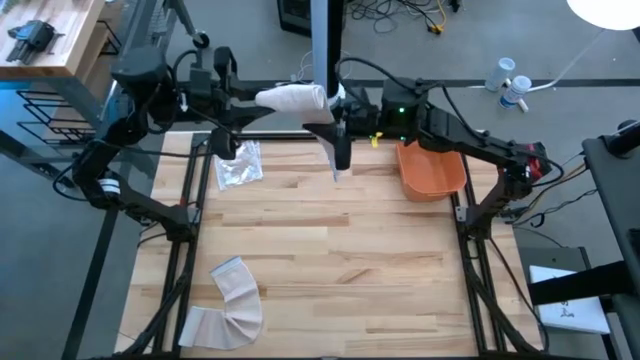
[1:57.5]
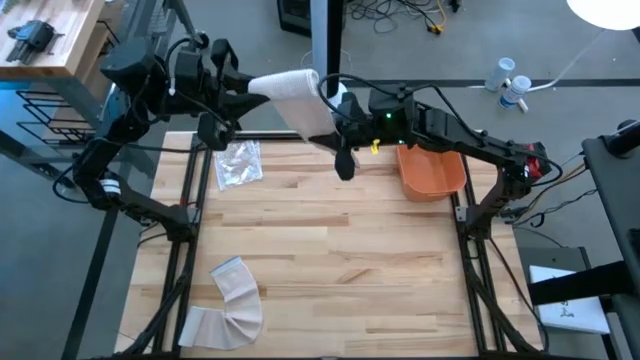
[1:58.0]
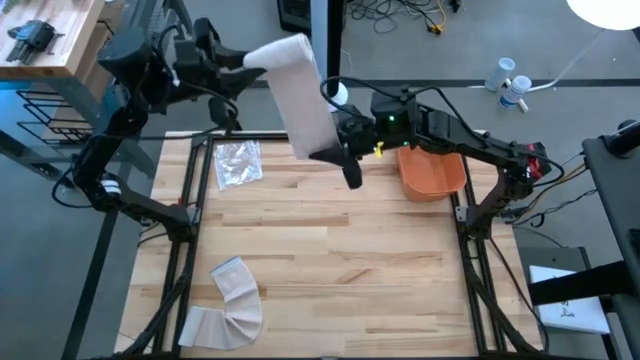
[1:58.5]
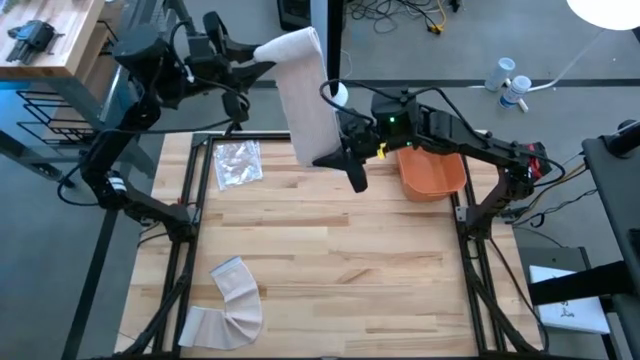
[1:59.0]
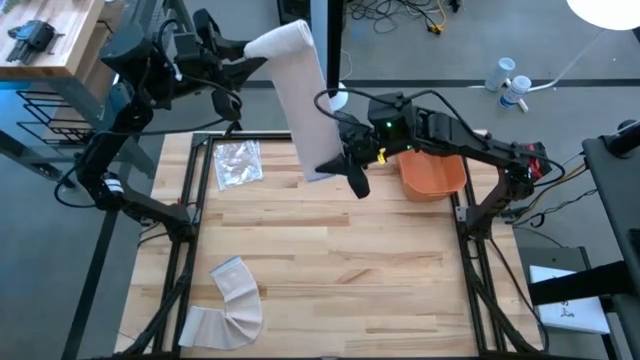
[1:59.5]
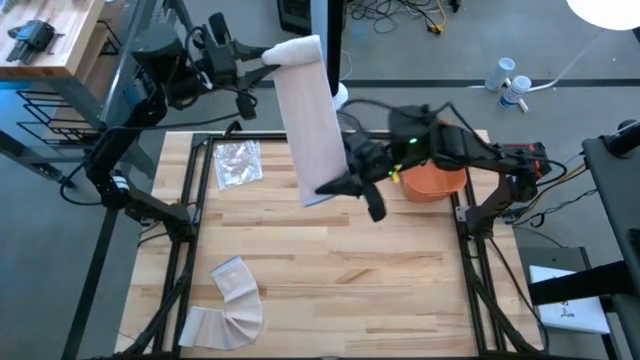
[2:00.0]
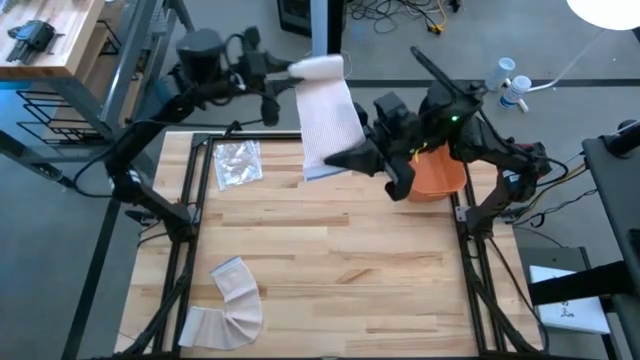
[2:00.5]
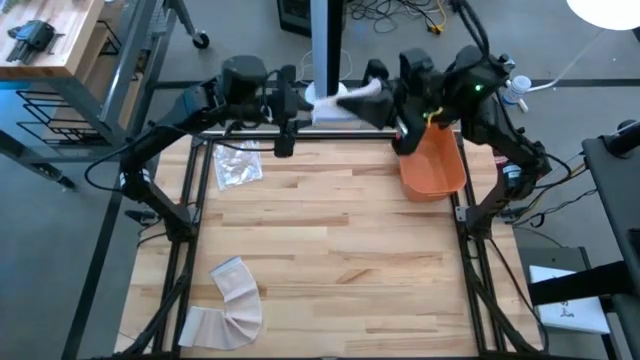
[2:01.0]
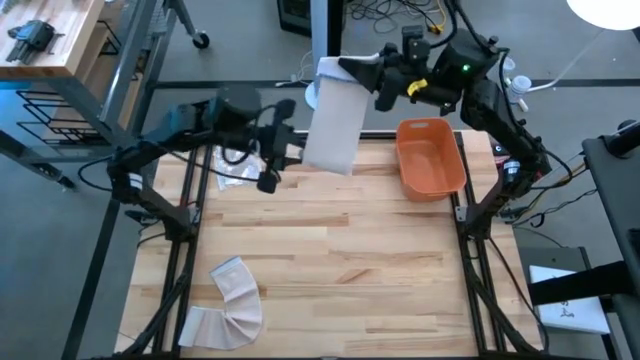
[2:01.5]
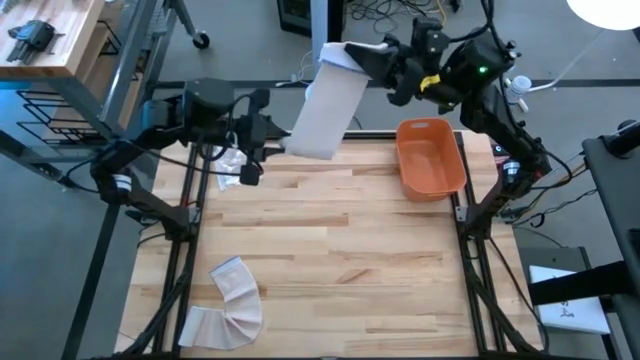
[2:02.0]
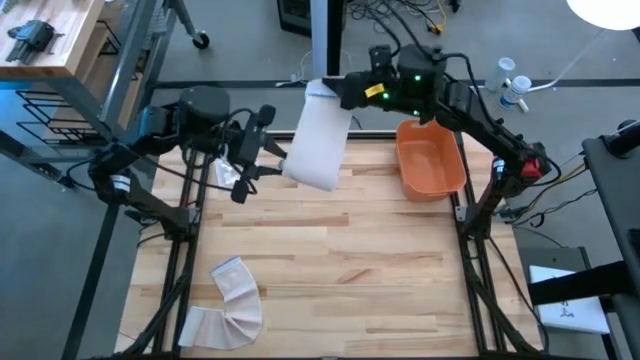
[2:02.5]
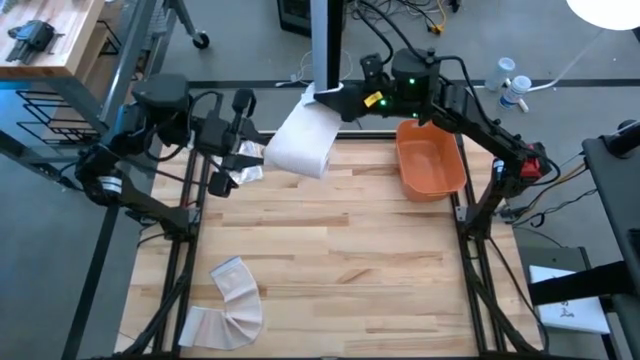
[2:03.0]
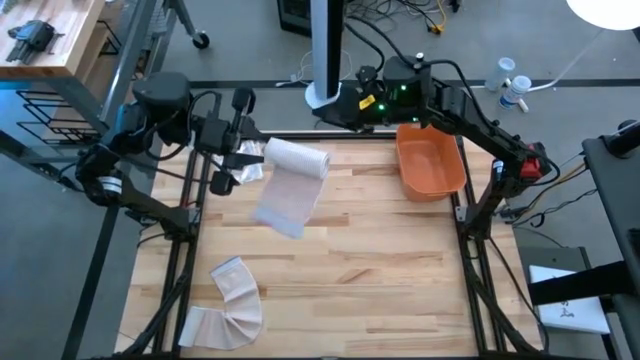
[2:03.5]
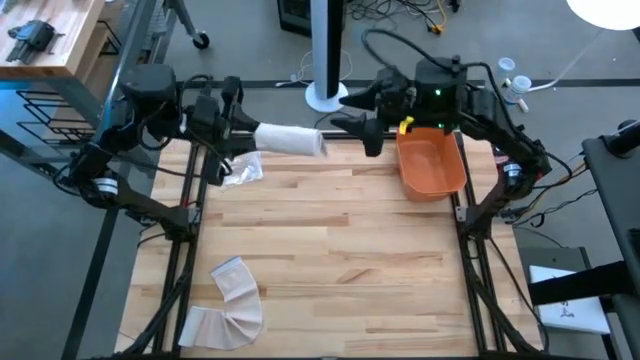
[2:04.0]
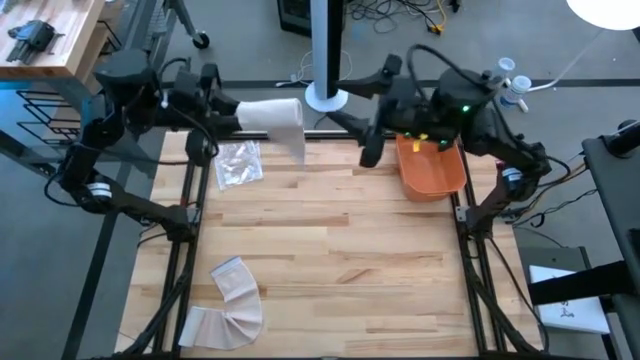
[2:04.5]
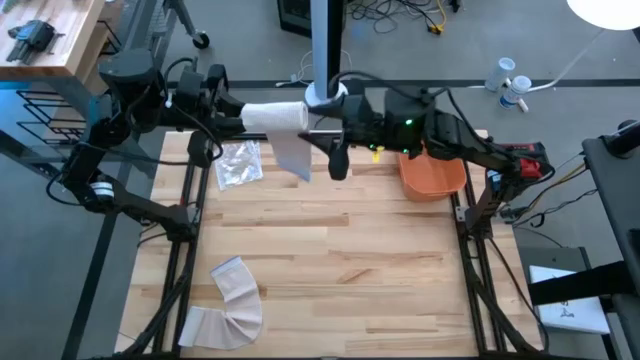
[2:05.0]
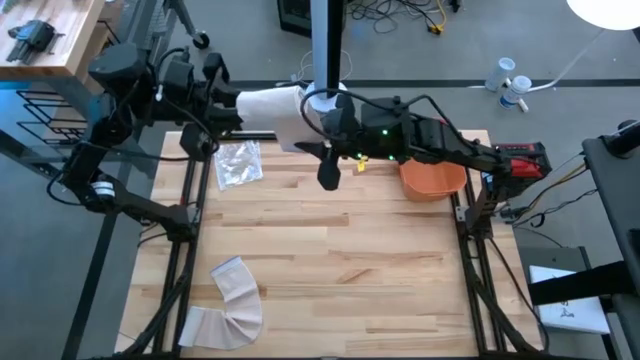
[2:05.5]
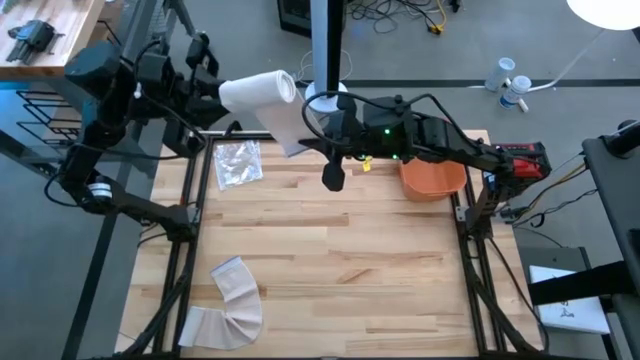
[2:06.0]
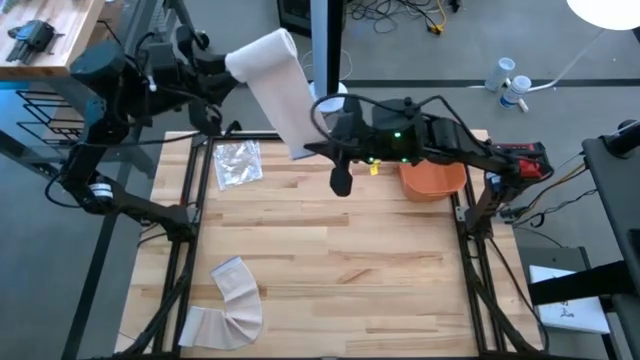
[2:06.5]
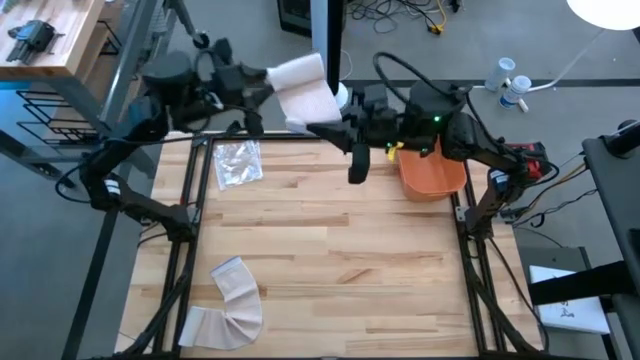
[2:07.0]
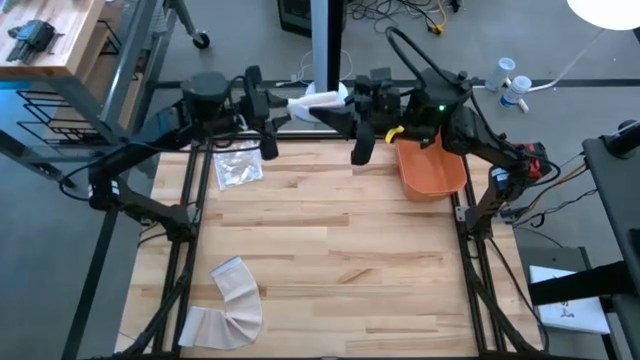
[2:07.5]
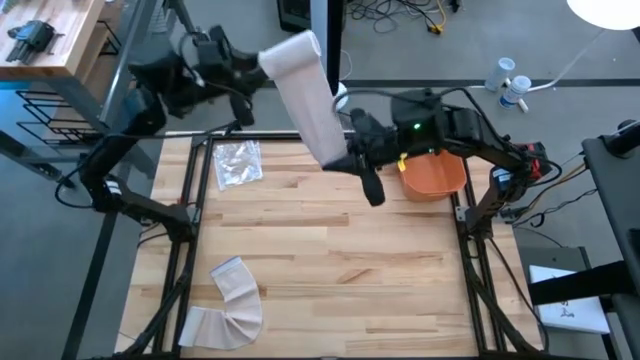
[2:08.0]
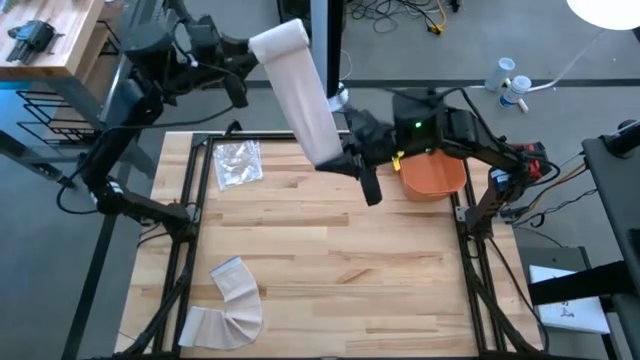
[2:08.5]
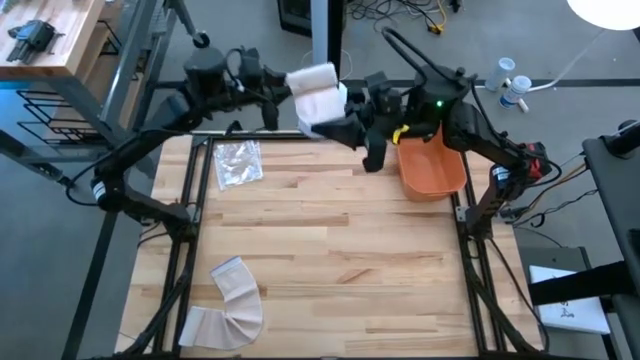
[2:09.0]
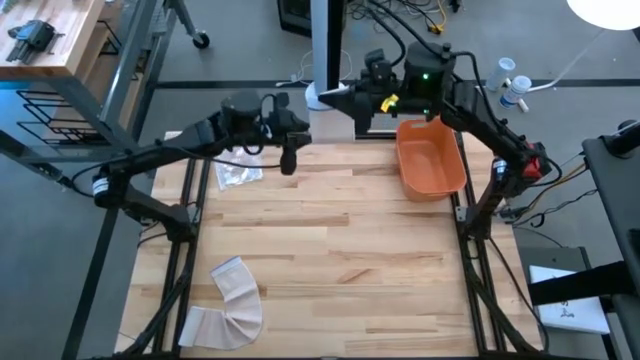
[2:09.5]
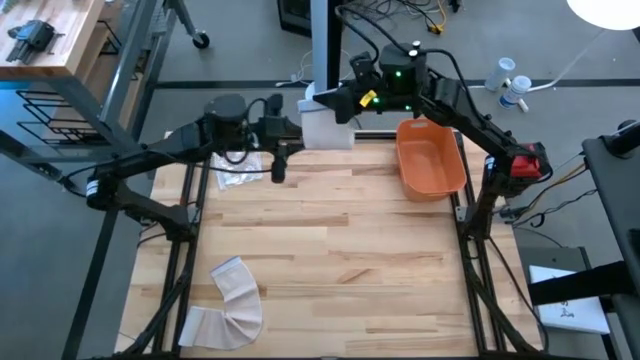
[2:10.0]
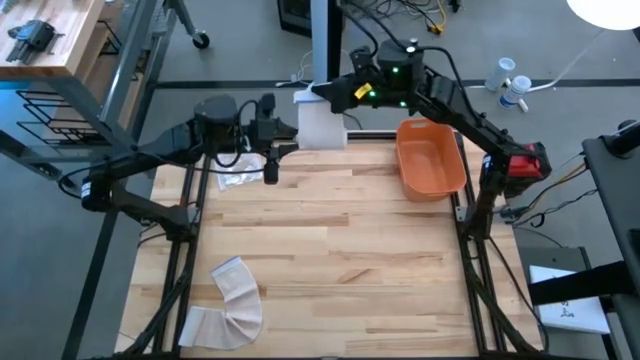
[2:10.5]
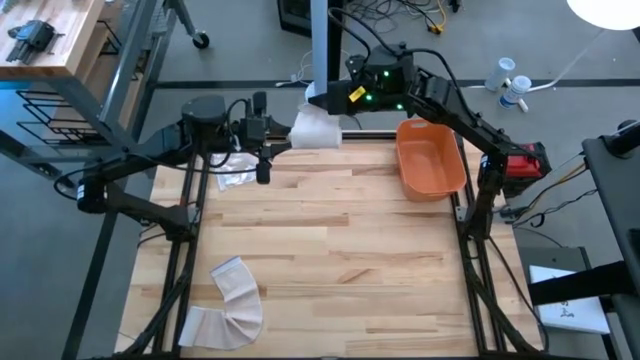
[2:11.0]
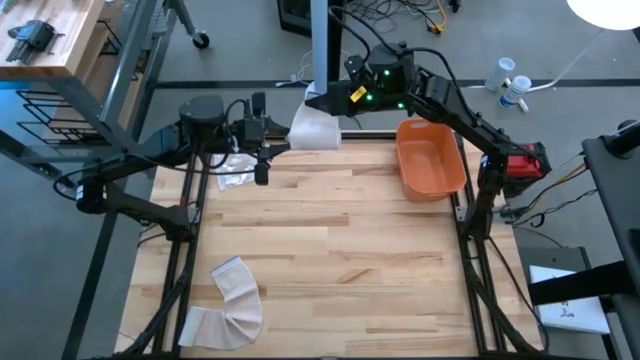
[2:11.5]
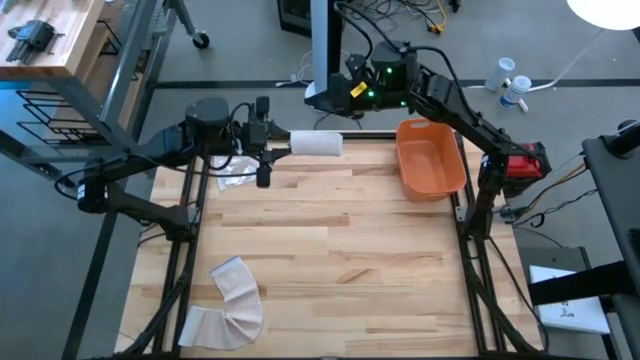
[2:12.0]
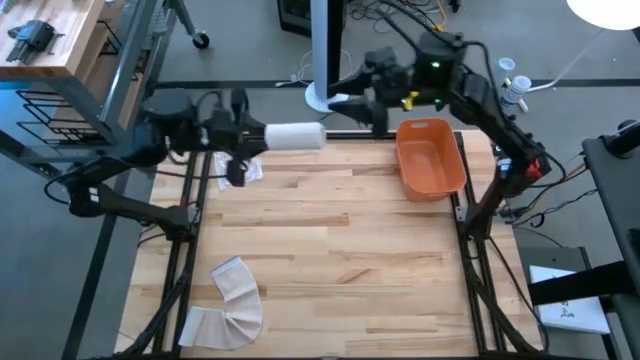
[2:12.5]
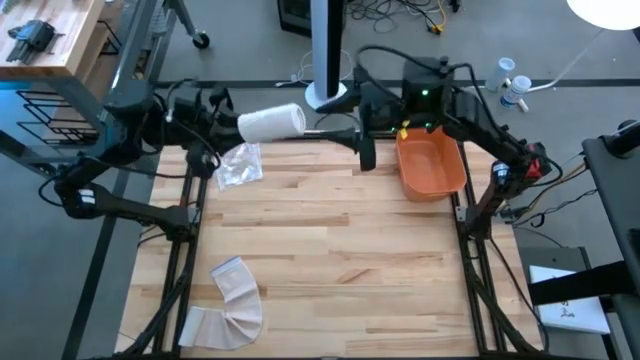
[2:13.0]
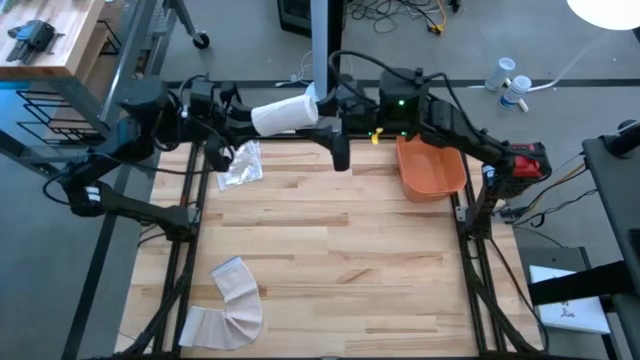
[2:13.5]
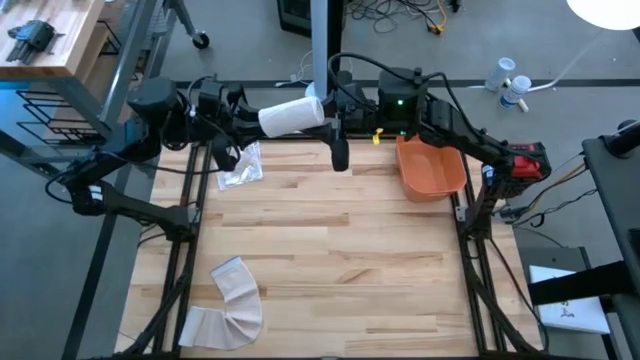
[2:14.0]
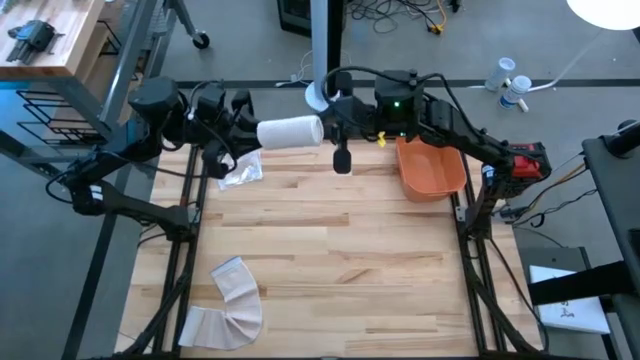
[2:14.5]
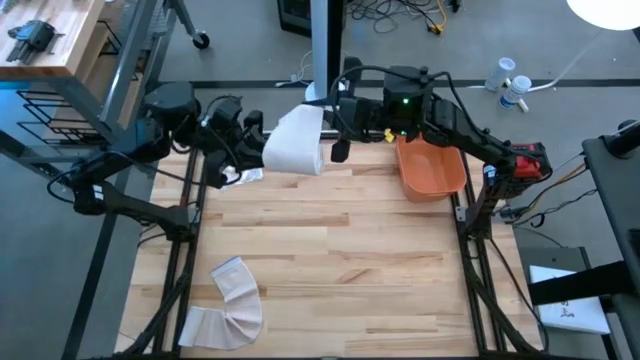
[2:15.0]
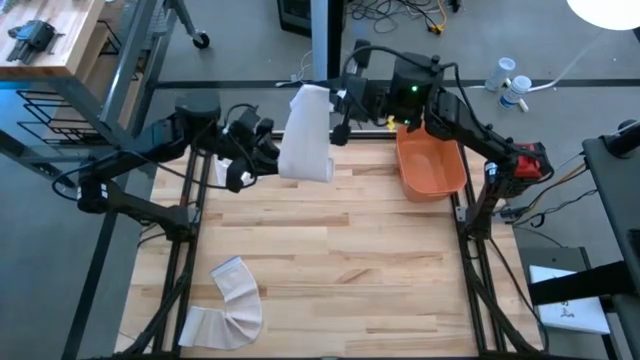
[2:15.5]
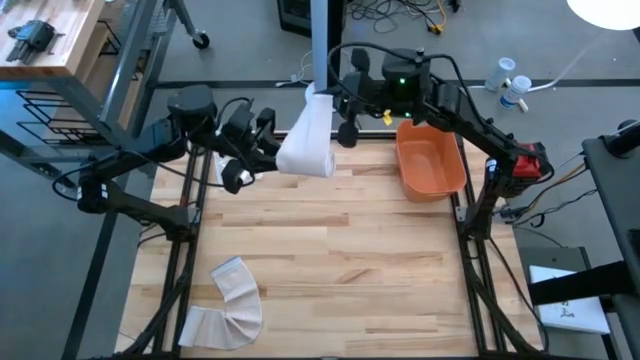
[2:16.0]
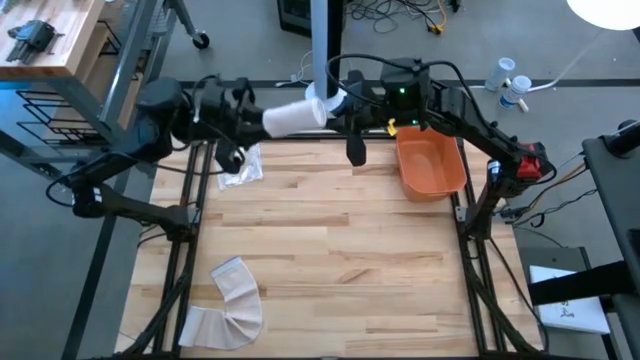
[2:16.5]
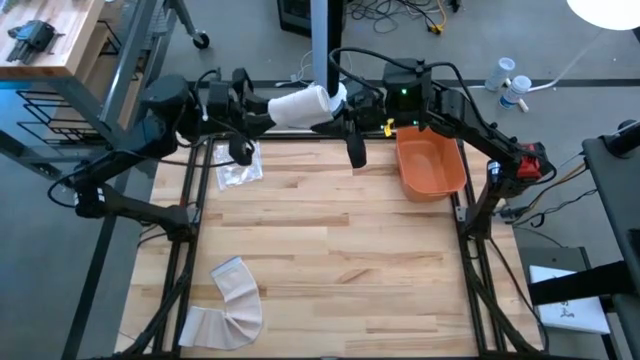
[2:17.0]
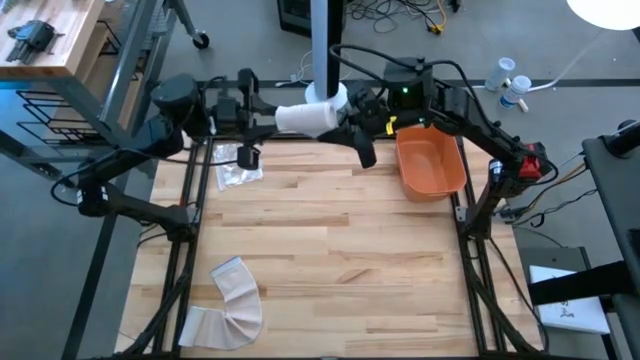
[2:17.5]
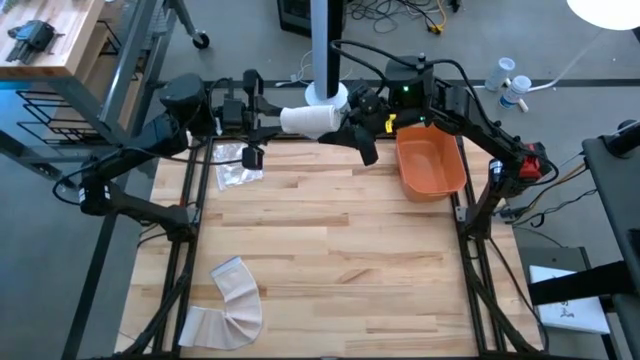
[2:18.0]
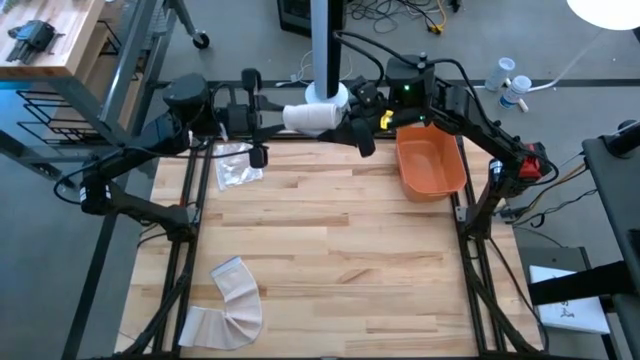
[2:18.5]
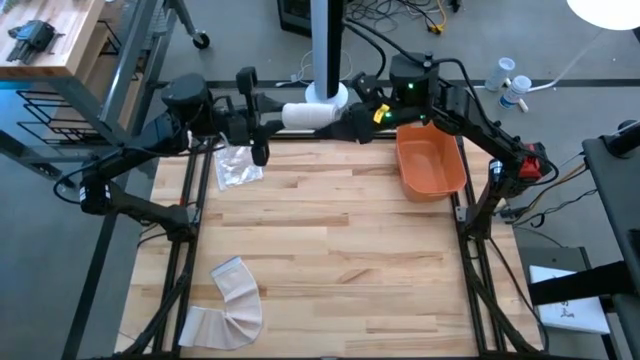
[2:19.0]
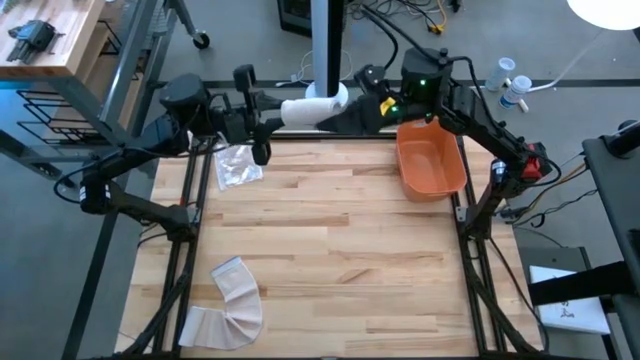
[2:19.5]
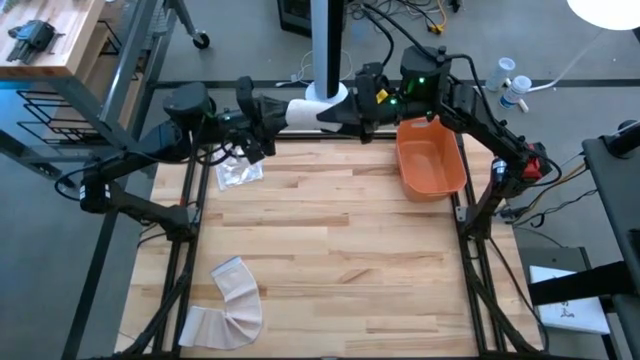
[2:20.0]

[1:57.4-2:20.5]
Task: Roll bandage
Roll the center brown bandage
